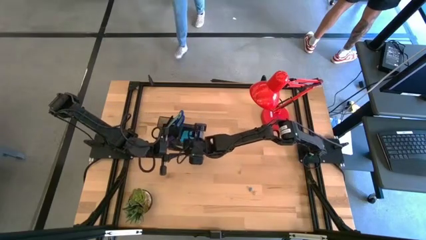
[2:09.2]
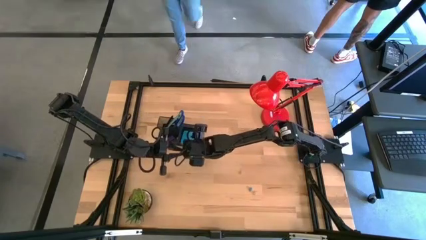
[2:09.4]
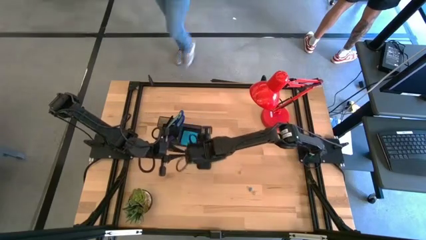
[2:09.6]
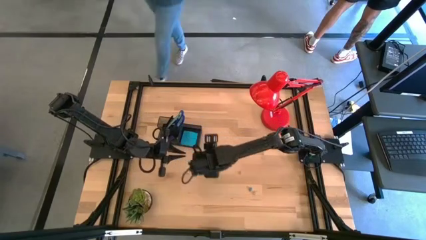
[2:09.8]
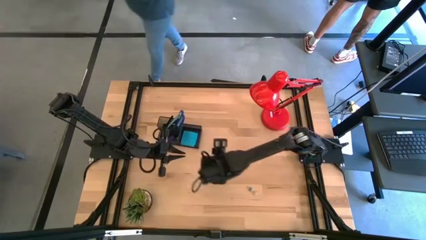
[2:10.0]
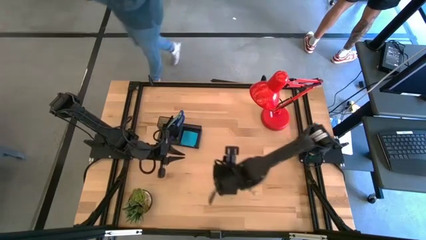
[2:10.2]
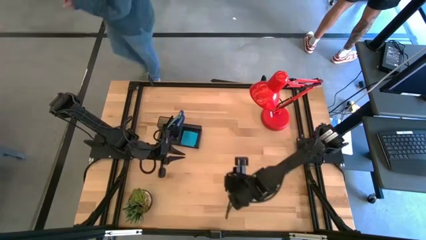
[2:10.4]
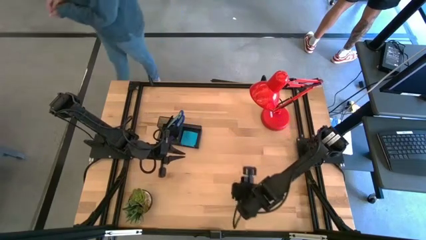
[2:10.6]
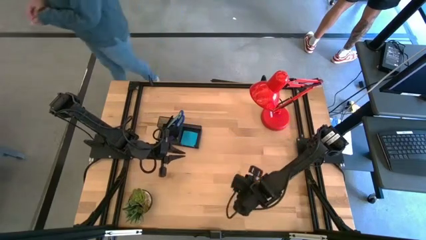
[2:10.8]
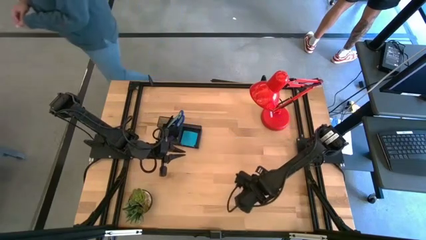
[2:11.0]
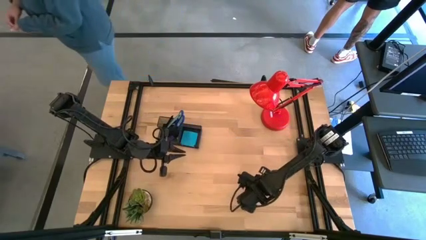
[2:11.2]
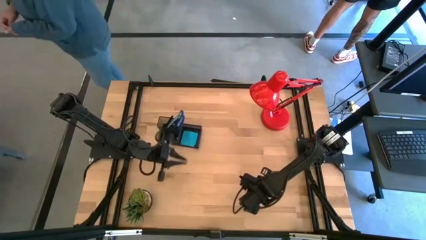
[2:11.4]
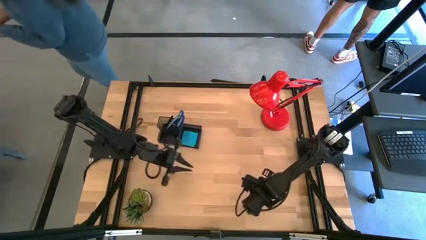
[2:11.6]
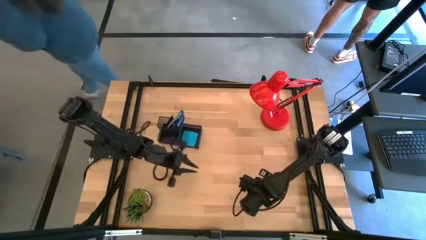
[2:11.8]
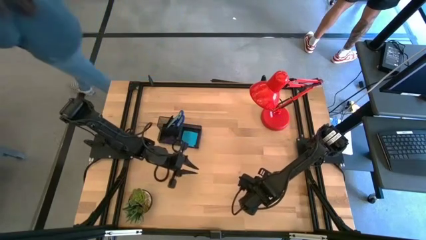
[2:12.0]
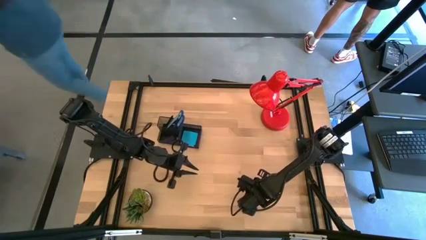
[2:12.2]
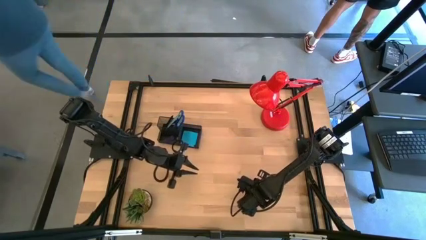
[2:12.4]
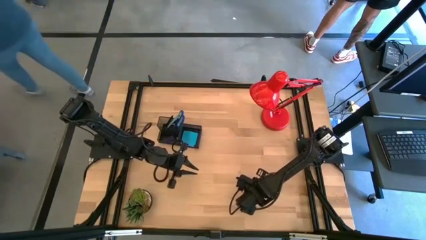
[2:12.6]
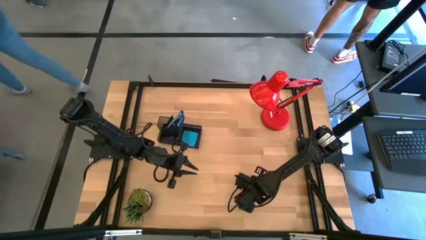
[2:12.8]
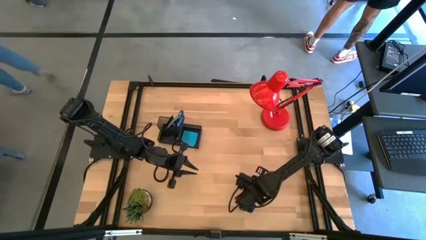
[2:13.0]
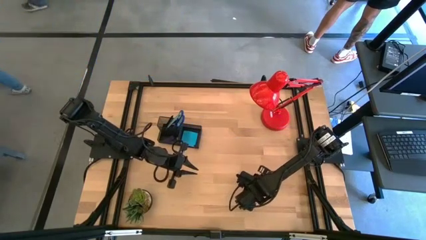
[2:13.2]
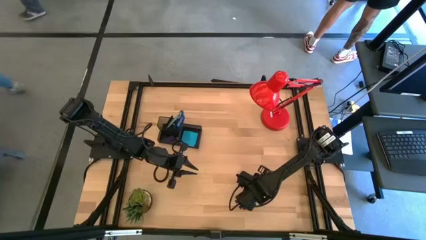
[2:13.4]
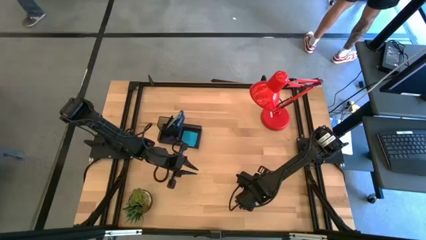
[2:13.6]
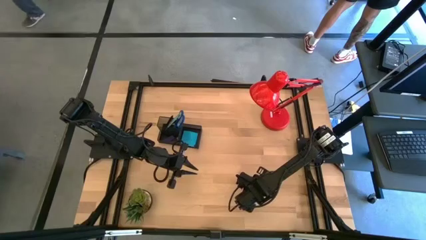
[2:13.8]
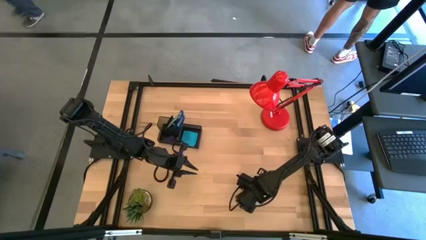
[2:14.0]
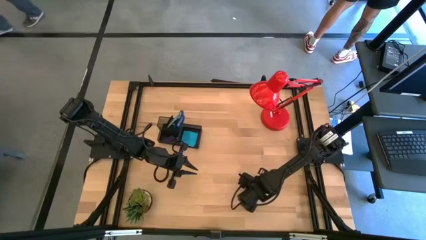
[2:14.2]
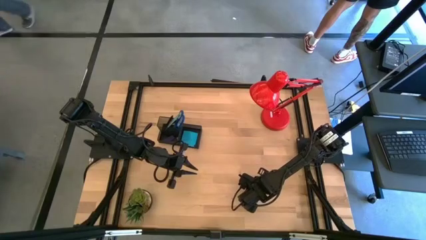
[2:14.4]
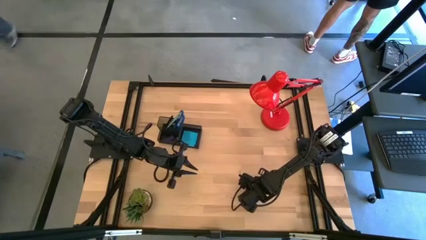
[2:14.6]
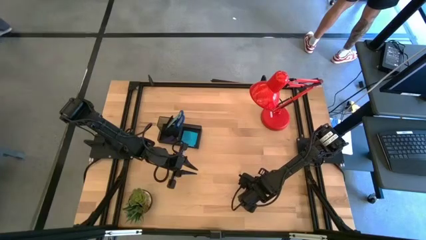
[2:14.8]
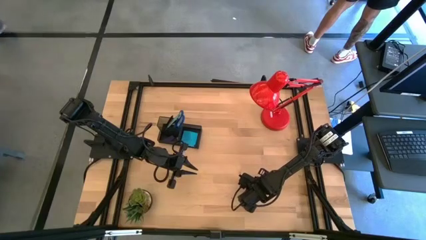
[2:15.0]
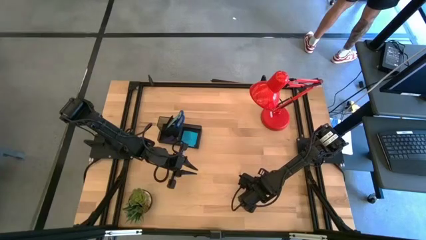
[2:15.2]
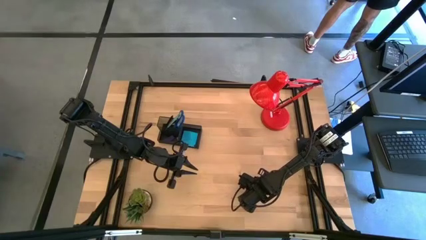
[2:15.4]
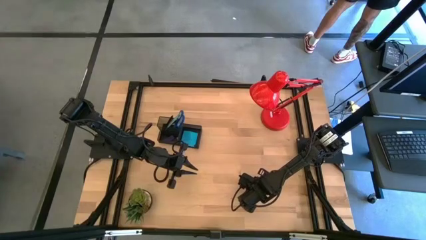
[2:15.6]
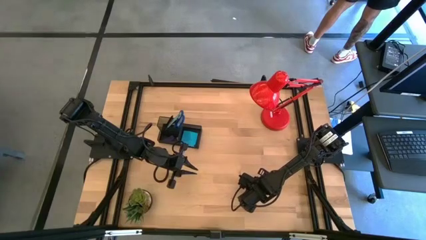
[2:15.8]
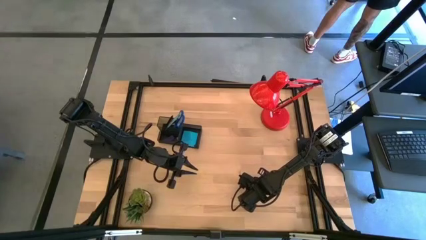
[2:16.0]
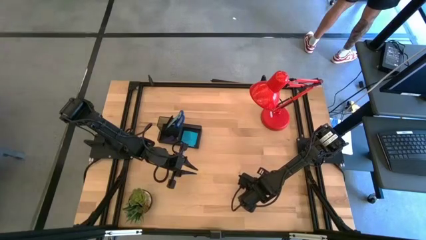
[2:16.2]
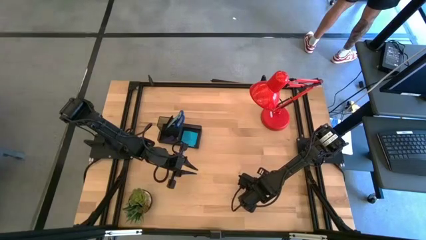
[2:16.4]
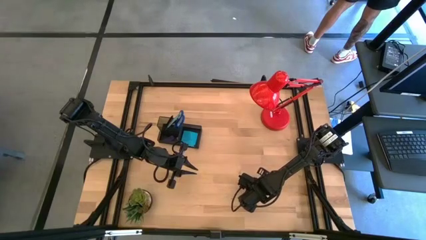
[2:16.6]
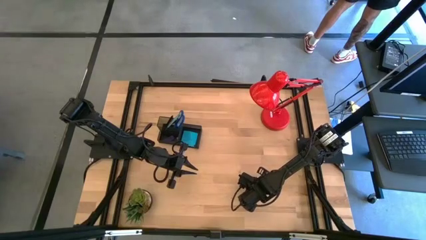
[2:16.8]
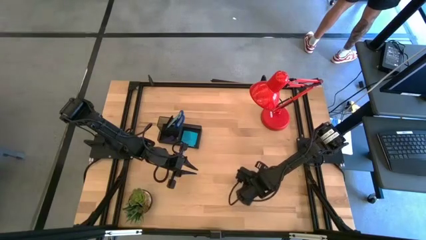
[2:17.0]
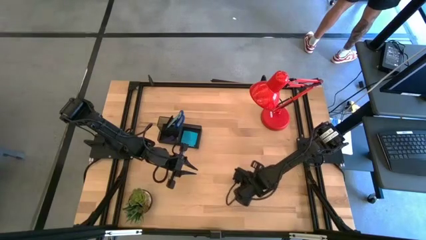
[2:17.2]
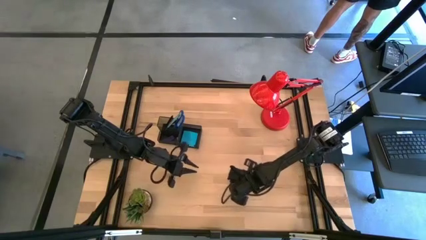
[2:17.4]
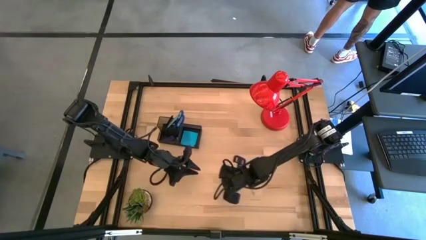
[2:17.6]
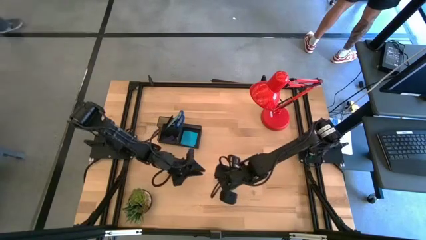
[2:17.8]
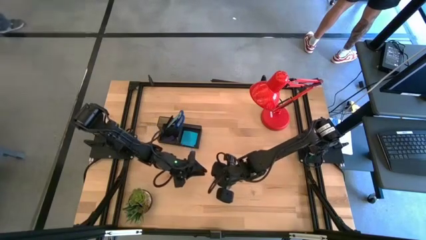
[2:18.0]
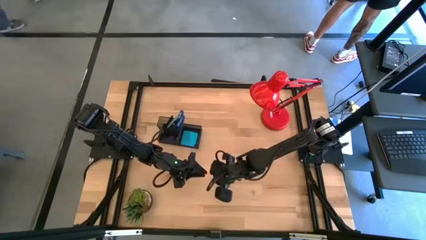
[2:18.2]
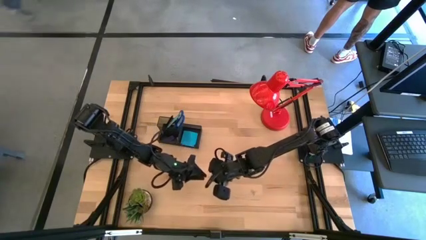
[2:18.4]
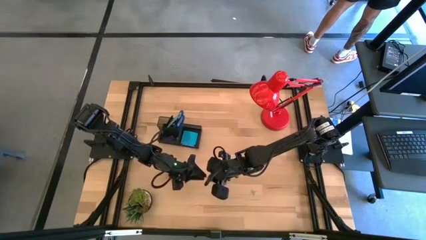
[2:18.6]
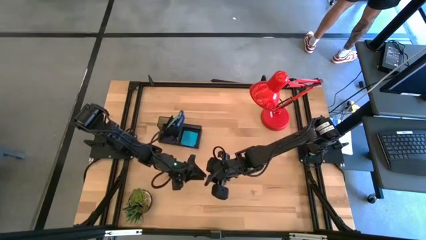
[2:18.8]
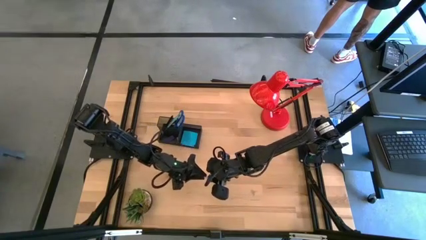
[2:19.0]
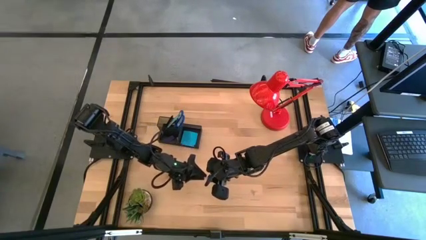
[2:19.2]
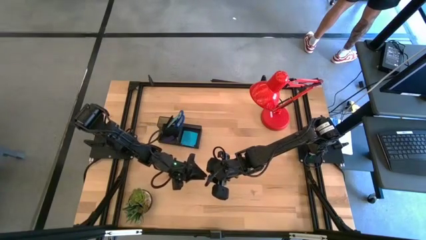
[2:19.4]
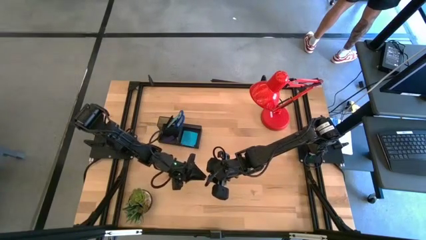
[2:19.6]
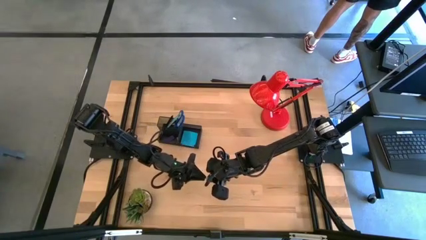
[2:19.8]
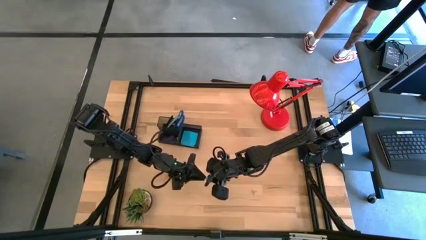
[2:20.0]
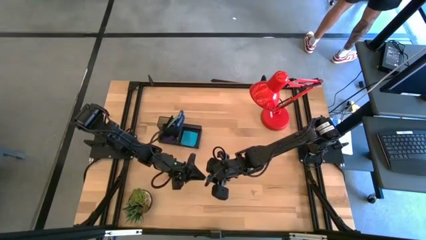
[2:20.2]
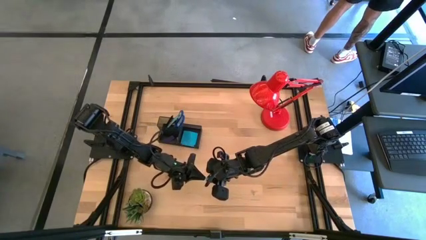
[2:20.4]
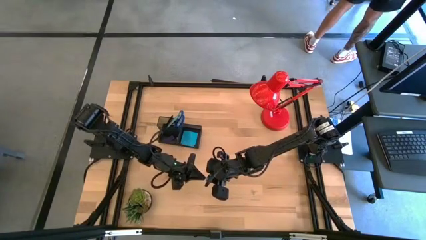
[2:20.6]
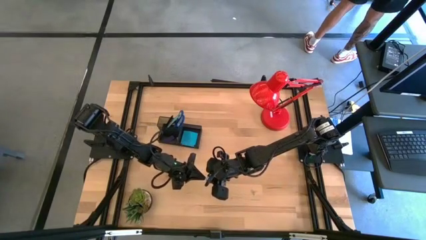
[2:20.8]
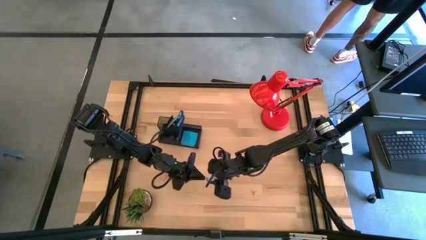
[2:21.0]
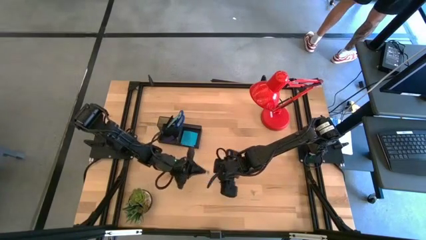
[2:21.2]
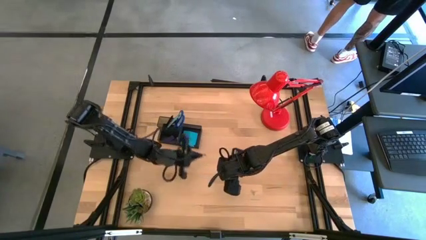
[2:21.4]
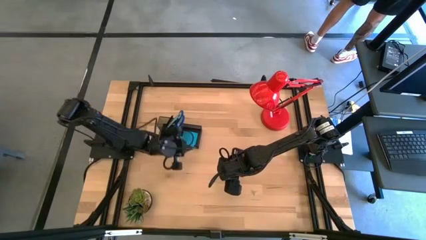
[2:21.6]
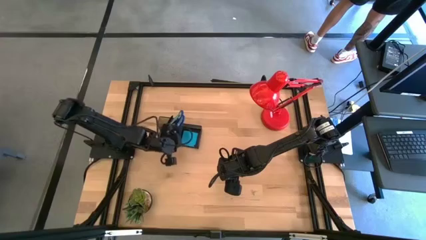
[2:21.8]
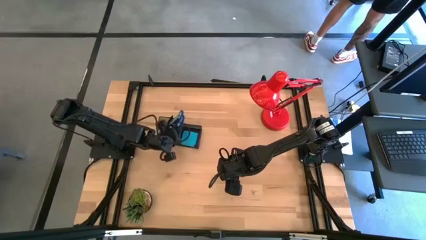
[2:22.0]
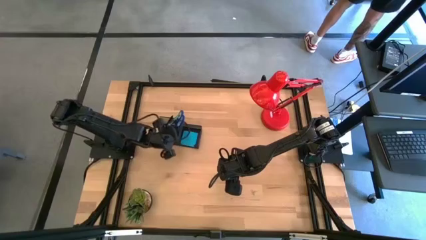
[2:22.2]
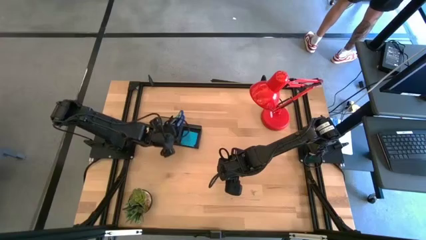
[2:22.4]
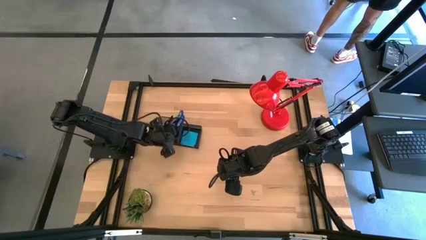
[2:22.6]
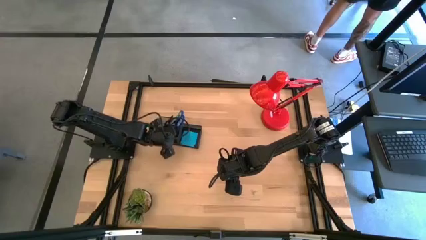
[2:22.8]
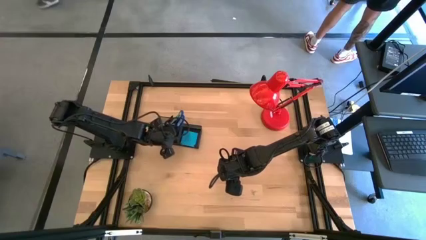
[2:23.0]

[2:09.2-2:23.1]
Task: Pick and place office supplies into organizer
Put the blue binder clip into the black desk organizer
